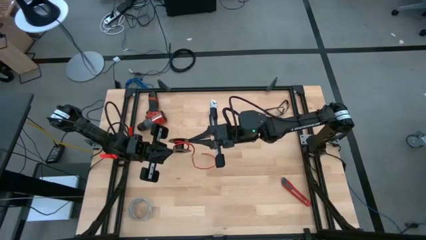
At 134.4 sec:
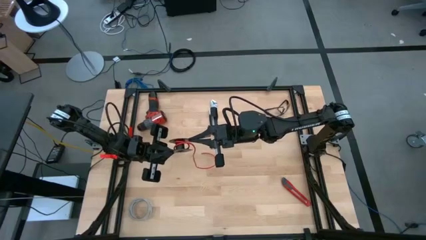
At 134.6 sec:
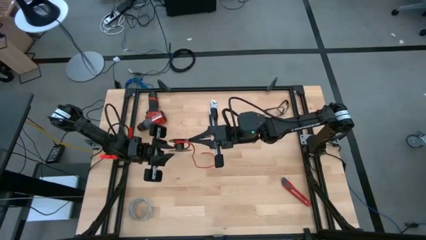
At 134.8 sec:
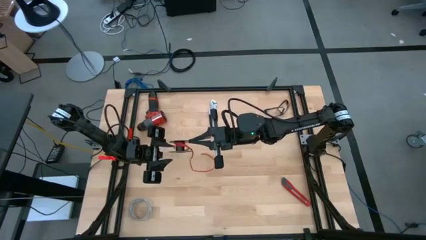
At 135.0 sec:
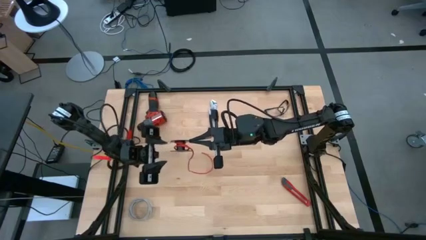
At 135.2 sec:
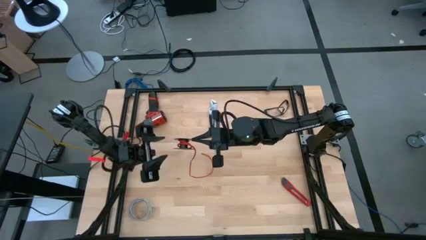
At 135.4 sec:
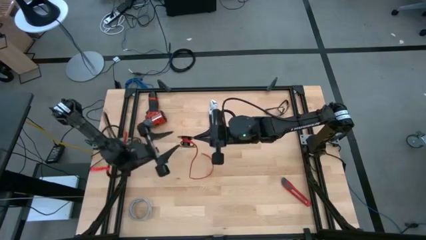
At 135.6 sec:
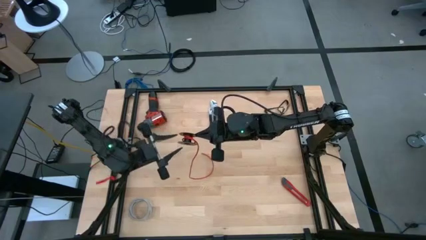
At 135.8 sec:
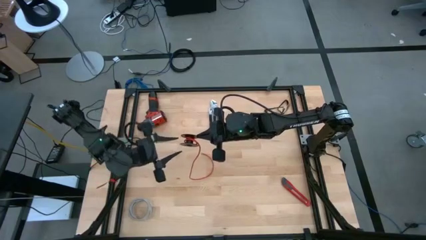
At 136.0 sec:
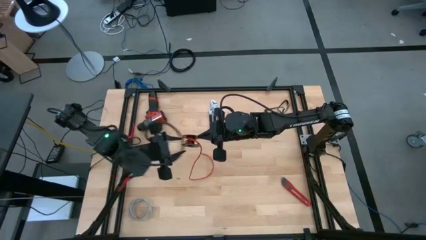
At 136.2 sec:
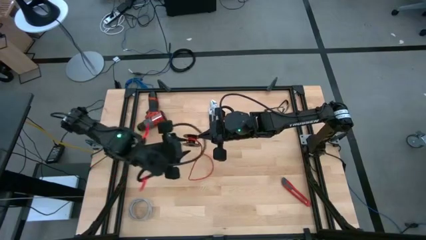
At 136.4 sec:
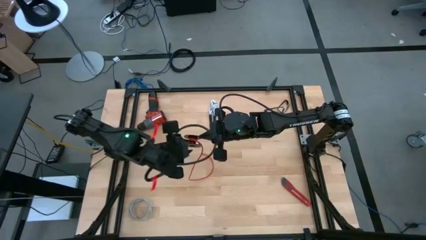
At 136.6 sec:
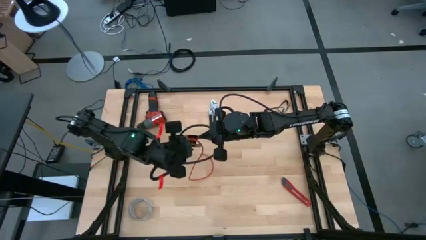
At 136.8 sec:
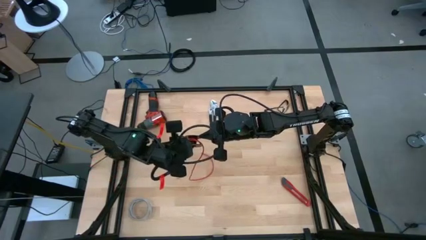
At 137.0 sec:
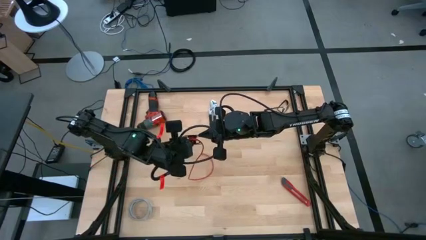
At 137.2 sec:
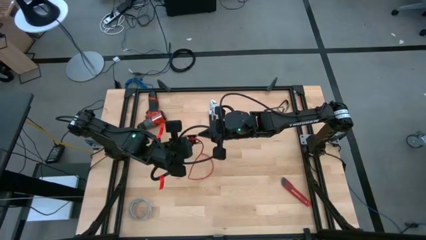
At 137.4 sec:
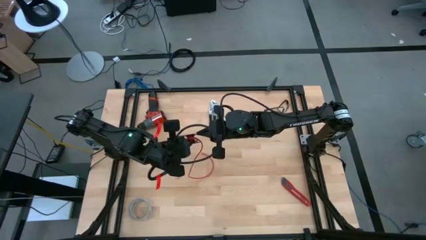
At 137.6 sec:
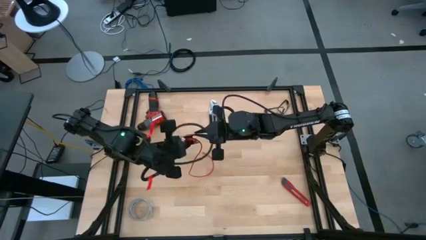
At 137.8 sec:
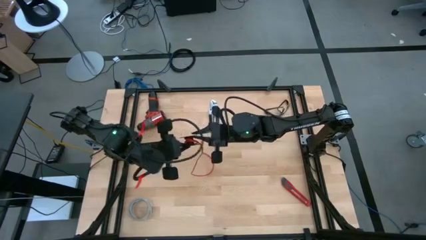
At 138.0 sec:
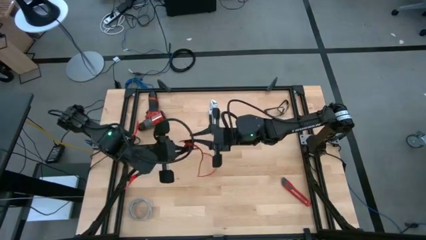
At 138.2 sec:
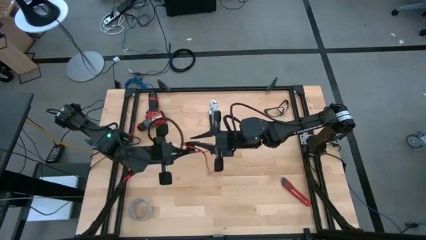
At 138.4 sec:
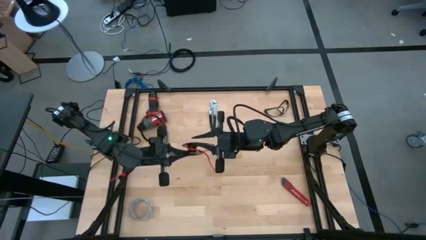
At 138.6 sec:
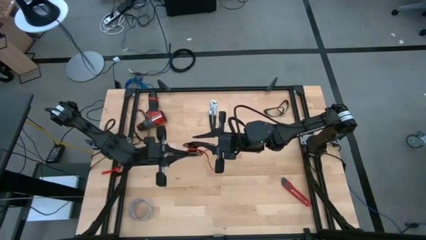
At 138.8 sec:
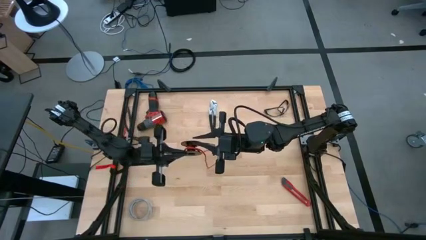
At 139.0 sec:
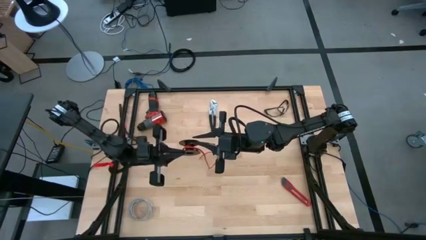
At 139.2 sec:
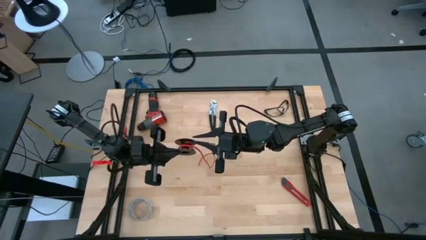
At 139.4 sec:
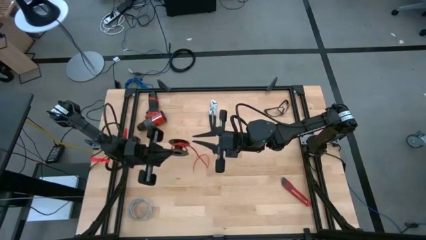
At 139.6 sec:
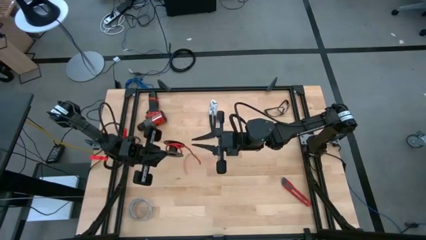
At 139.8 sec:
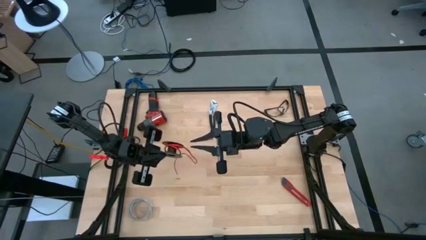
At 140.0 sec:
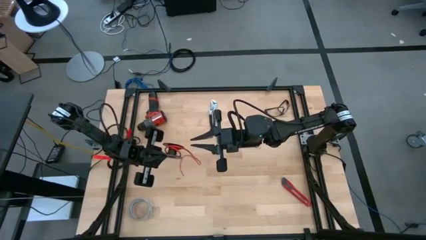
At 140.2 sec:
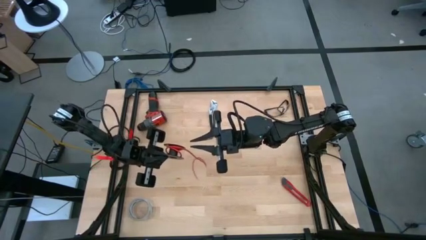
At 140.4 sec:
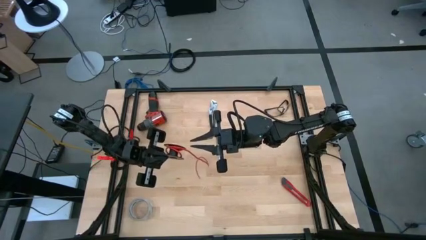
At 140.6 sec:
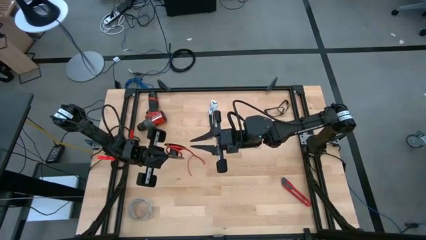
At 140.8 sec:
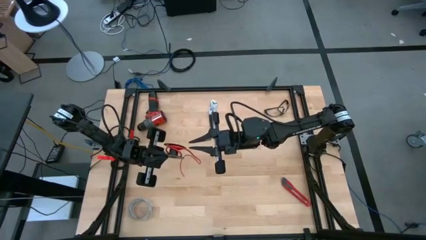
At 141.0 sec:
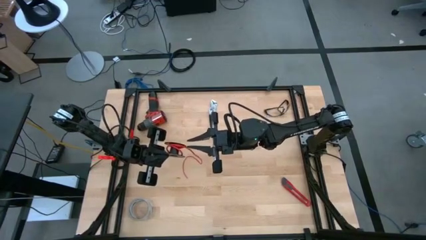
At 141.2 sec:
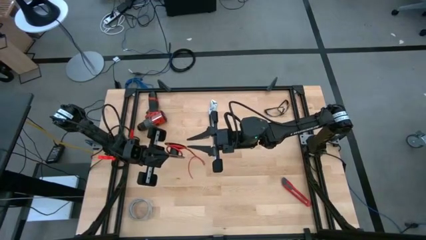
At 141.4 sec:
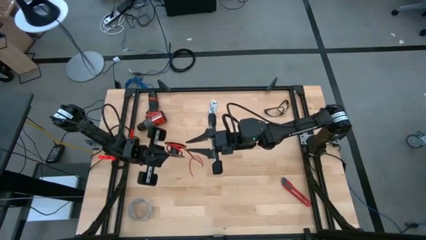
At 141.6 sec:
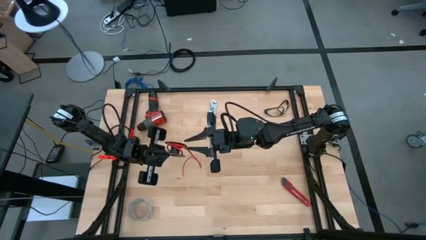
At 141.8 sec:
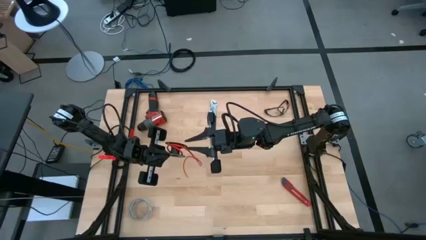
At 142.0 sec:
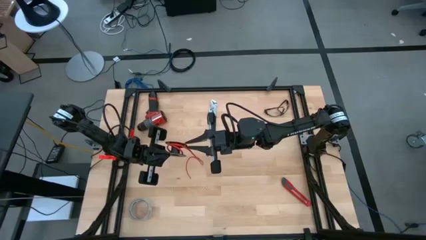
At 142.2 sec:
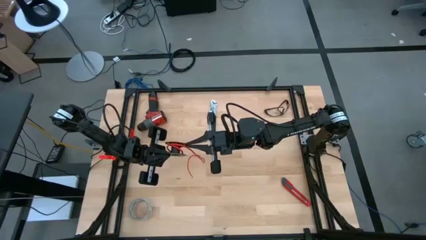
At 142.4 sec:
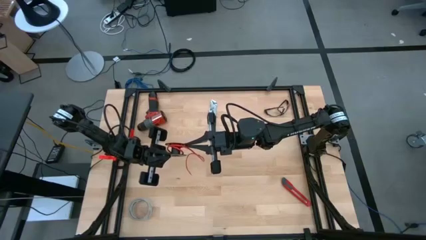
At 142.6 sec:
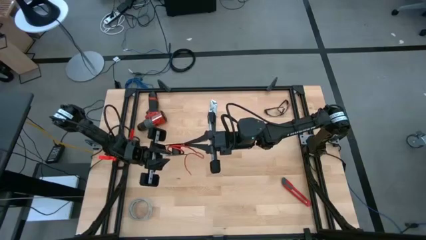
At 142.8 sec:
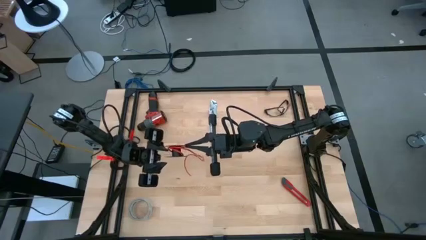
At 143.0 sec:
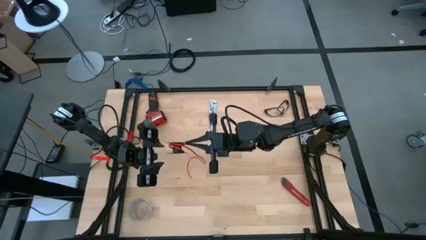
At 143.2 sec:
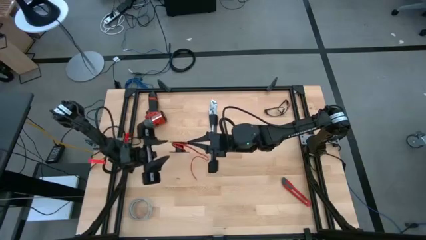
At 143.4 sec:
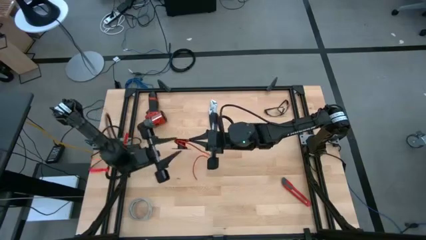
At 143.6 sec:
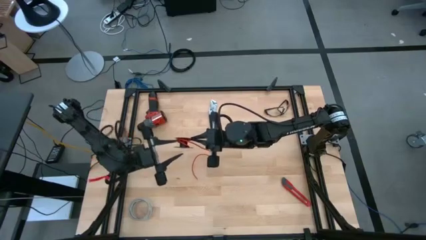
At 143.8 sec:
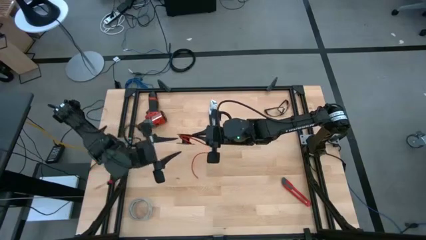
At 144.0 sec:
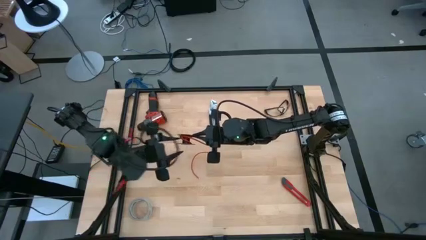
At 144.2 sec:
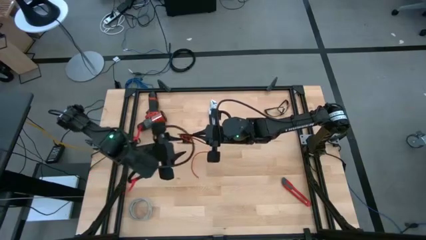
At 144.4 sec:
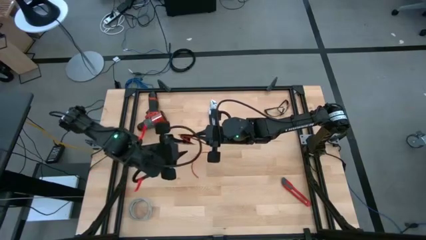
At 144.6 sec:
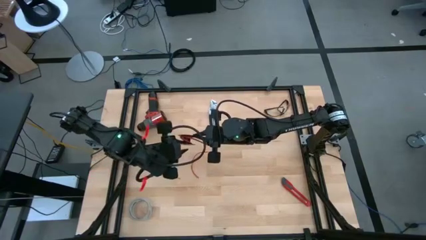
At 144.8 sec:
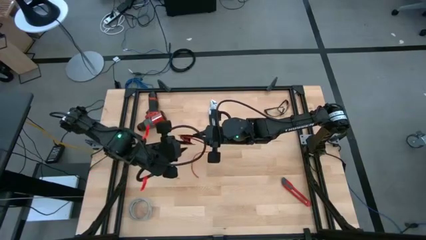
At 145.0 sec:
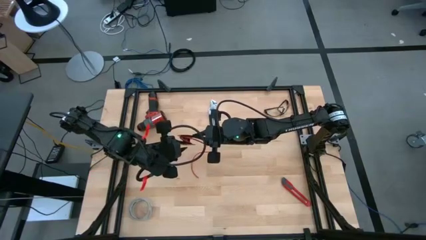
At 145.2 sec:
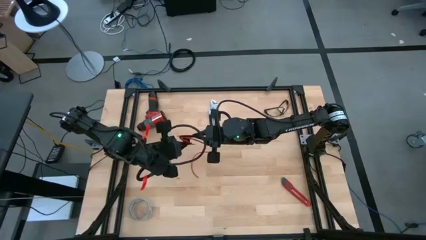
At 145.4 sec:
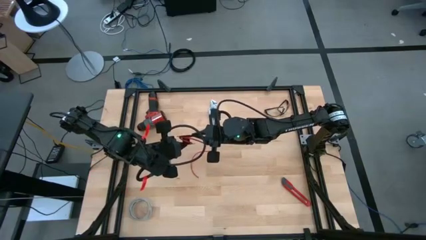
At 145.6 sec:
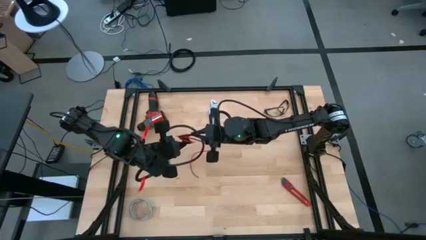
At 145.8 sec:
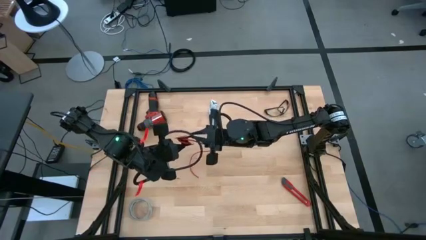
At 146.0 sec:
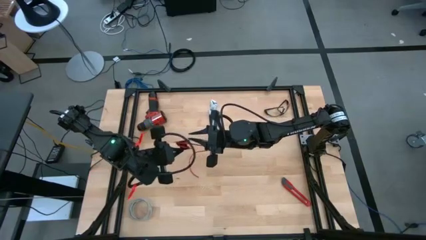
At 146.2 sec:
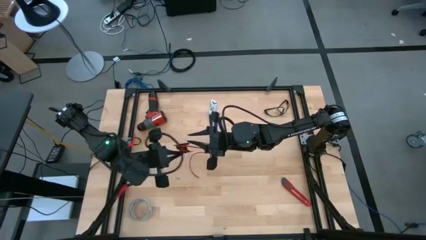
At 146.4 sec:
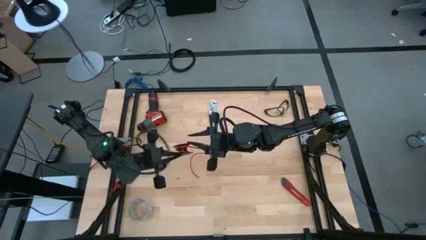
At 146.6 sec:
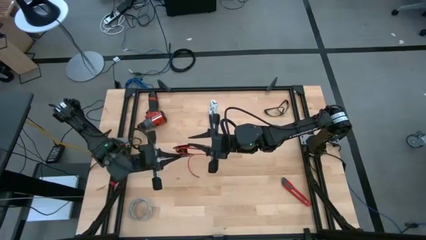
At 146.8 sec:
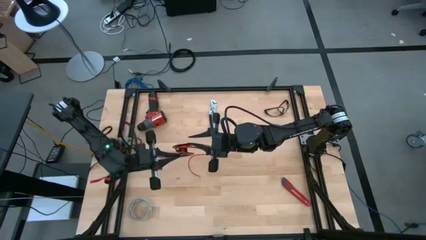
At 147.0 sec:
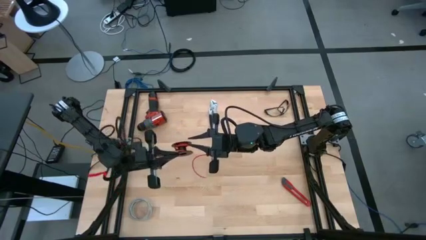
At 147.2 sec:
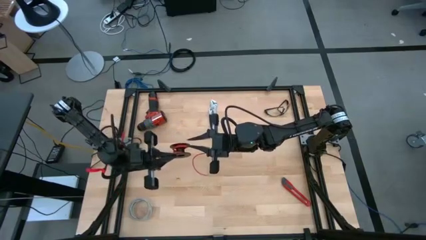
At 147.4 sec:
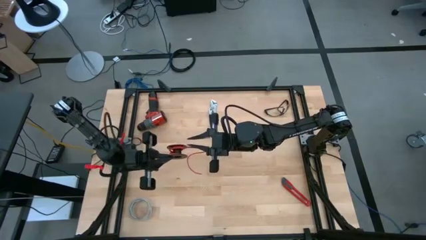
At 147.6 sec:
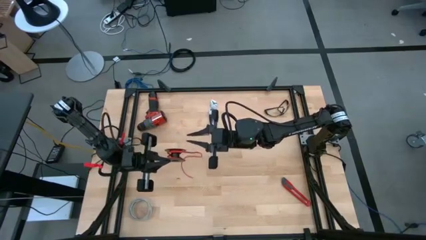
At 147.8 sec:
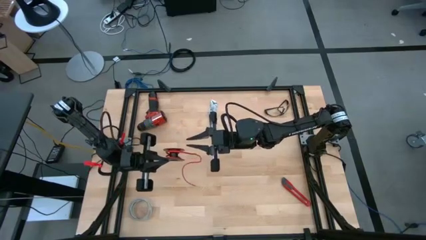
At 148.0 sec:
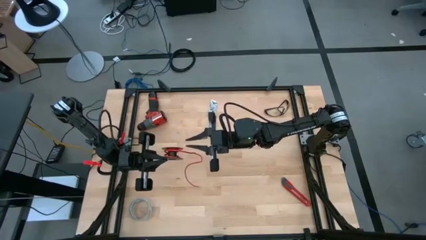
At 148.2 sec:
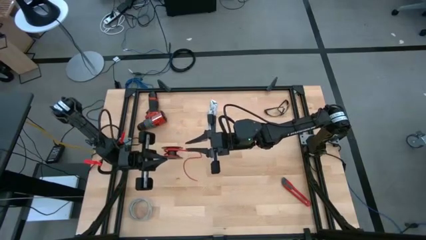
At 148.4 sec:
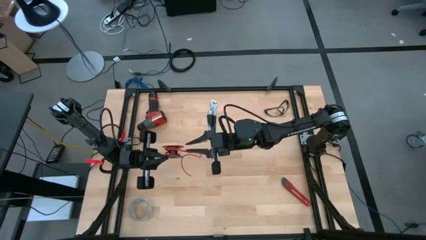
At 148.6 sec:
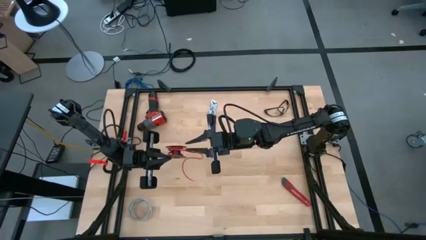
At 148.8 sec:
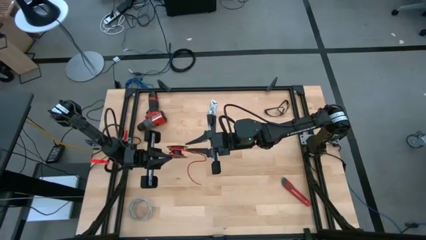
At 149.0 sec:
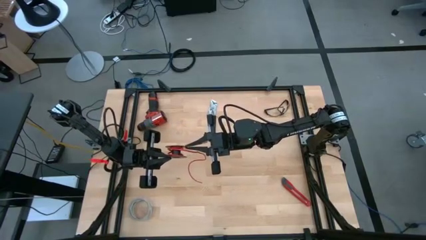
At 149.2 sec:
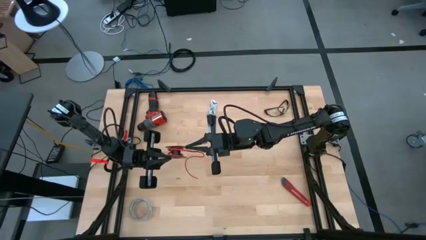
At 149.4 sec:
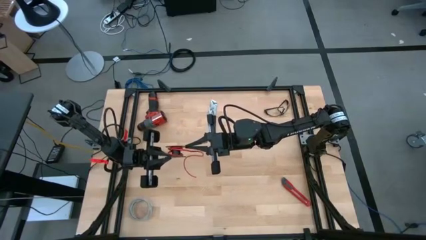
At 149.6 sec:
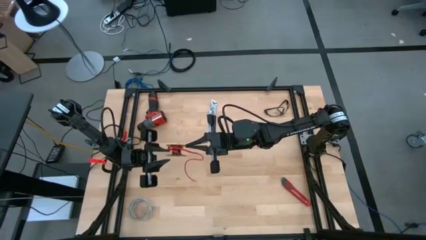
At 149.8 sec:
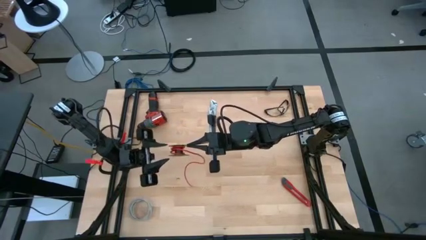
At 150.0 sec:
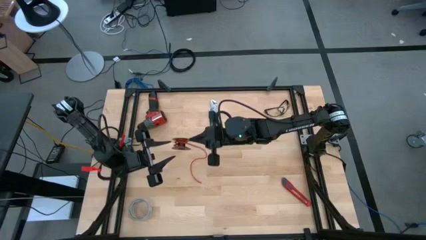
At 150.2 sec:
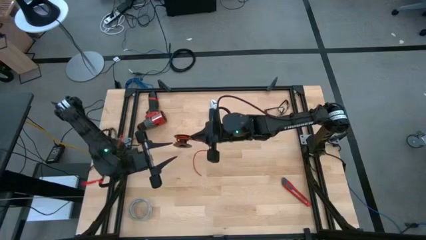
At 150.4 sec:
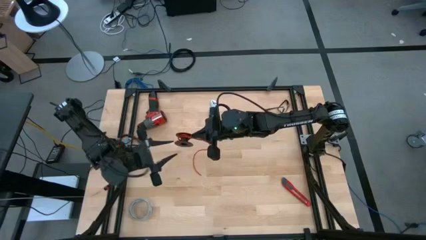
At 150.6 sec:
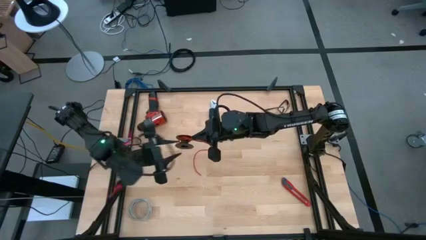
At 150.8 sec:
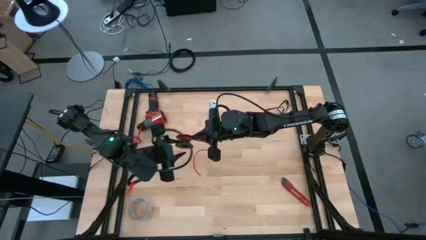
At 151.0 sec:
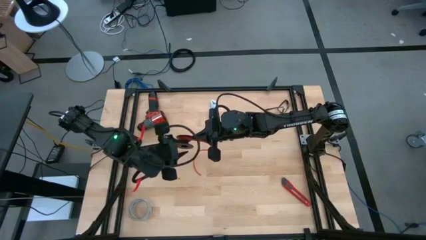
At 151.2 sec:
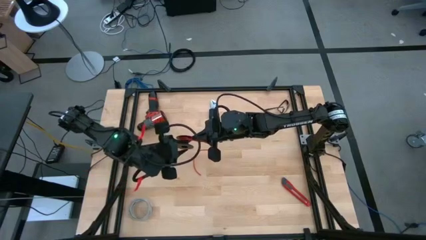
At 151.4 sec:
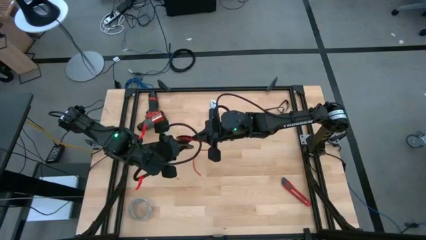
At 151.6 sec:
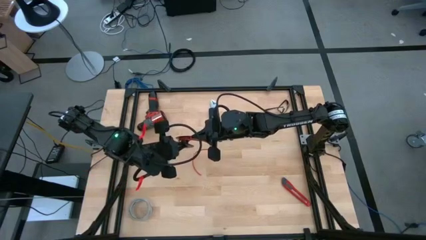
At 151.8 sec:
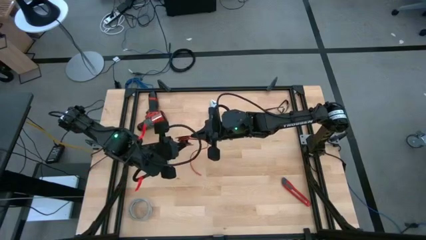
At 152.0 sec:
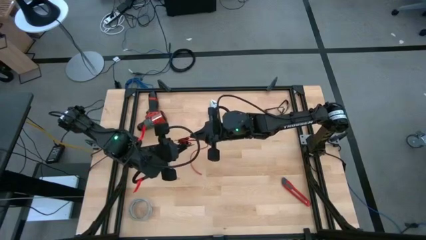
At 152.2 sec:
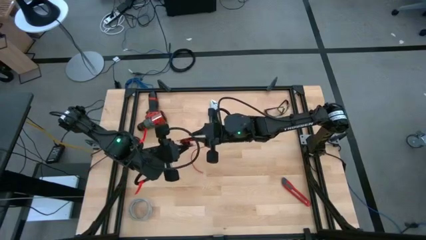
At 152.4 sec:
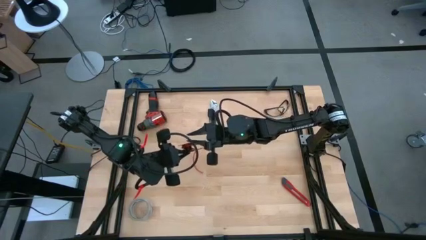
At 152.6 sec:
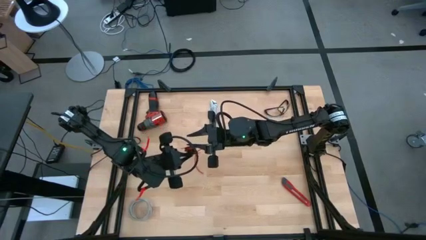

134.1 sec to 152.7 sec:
Task: Coil cords
Coil the red wire onto the black spool
